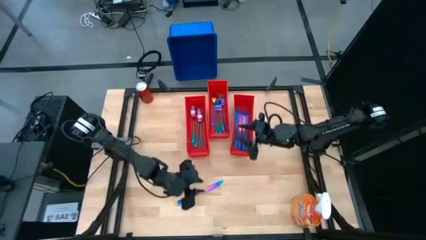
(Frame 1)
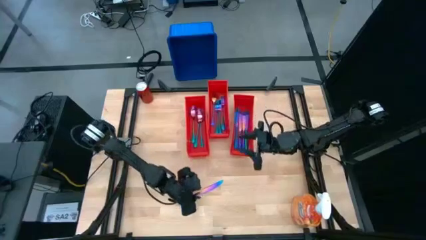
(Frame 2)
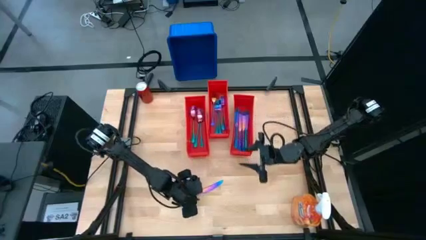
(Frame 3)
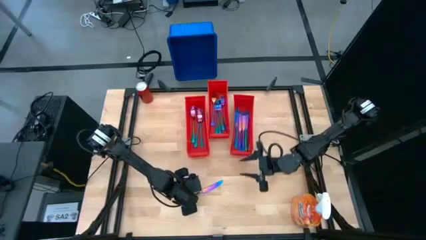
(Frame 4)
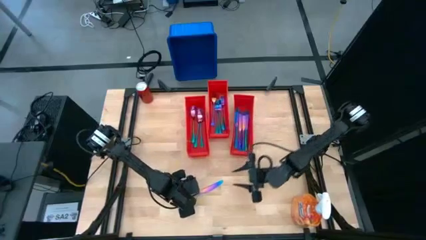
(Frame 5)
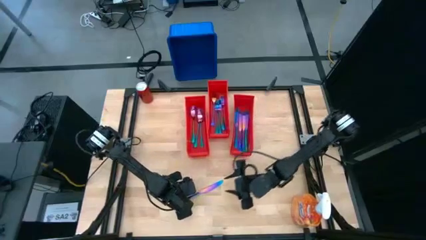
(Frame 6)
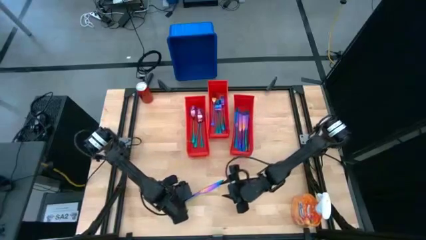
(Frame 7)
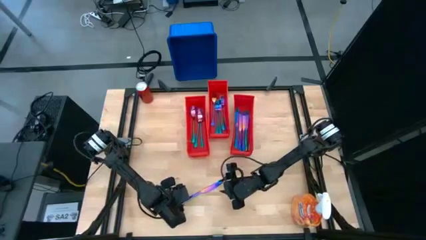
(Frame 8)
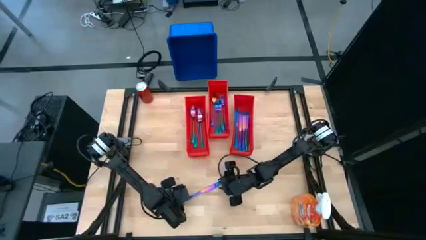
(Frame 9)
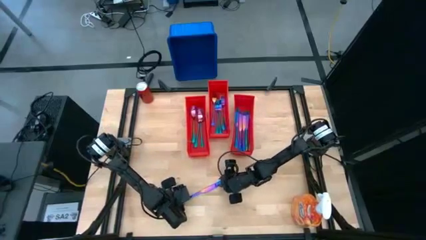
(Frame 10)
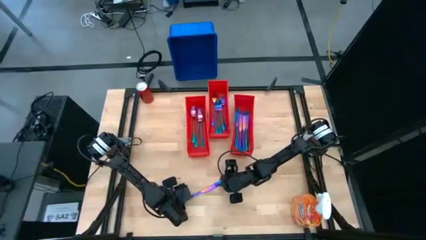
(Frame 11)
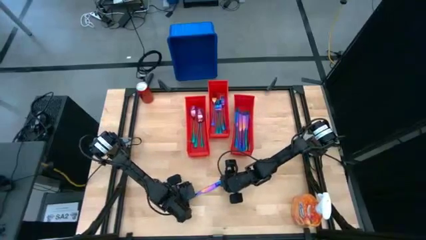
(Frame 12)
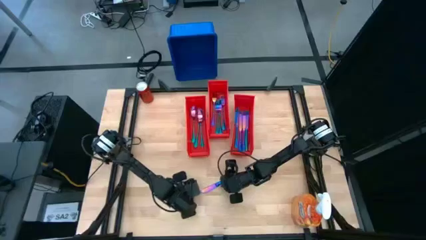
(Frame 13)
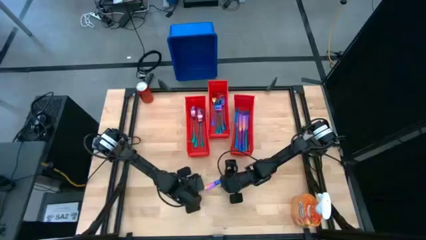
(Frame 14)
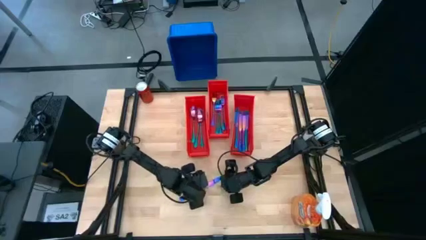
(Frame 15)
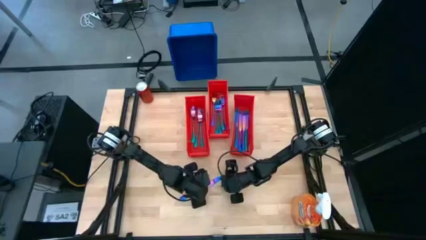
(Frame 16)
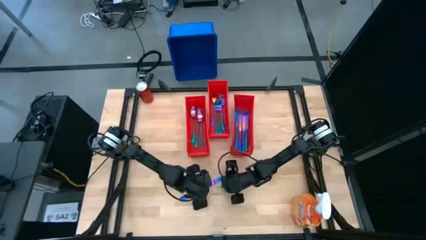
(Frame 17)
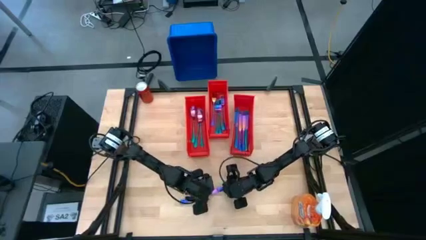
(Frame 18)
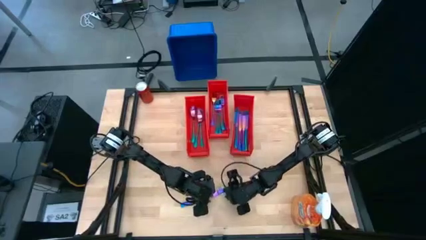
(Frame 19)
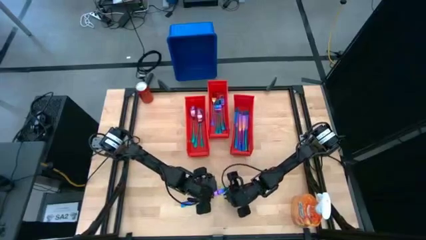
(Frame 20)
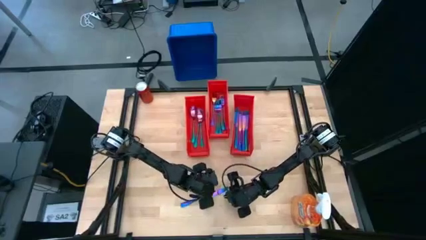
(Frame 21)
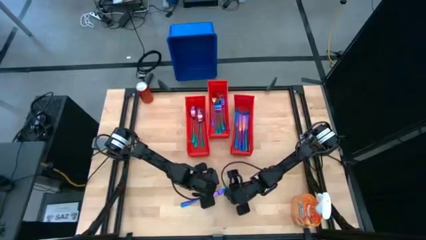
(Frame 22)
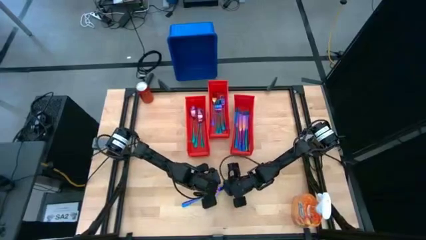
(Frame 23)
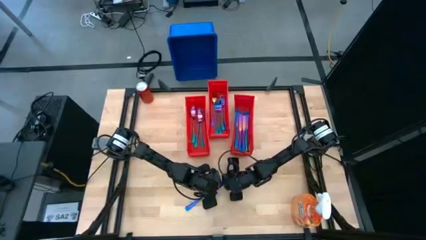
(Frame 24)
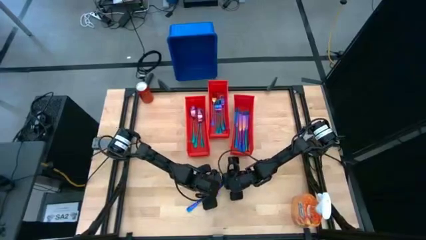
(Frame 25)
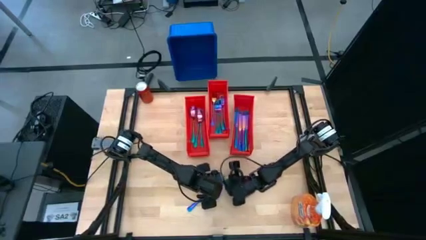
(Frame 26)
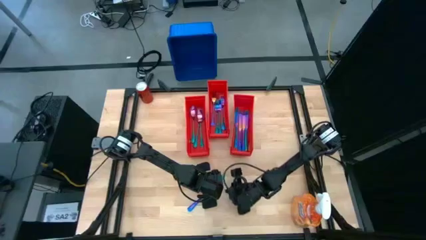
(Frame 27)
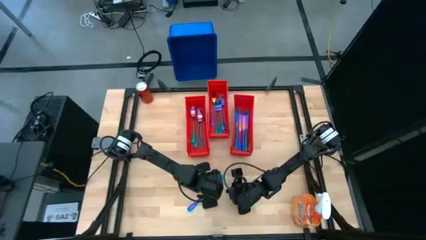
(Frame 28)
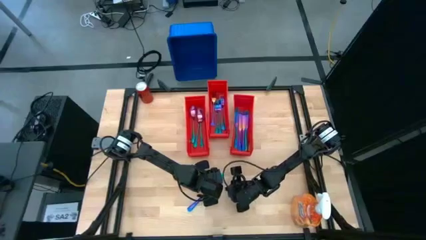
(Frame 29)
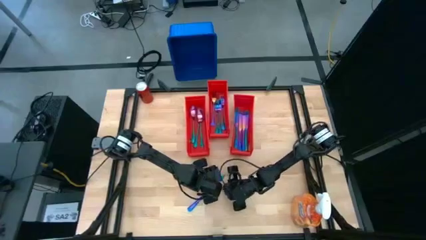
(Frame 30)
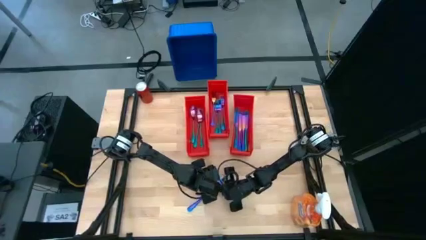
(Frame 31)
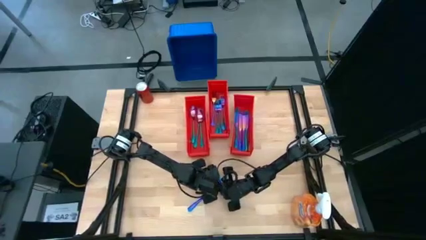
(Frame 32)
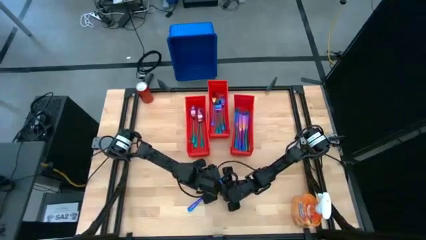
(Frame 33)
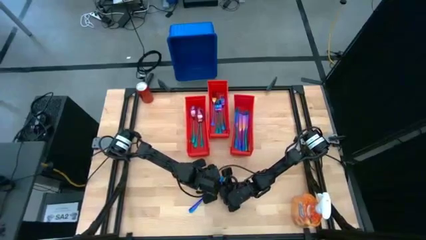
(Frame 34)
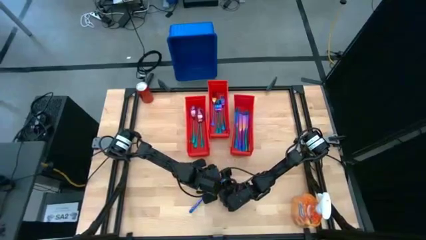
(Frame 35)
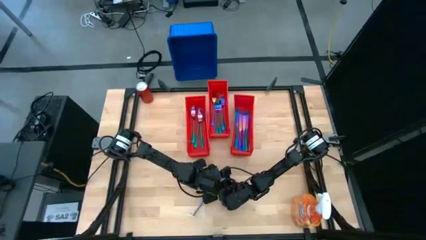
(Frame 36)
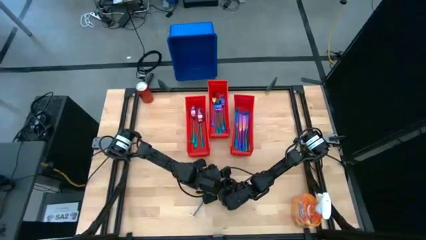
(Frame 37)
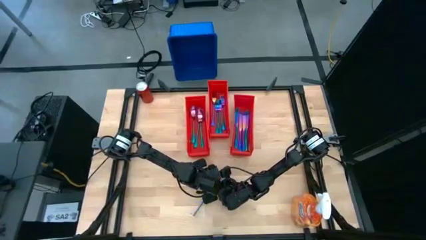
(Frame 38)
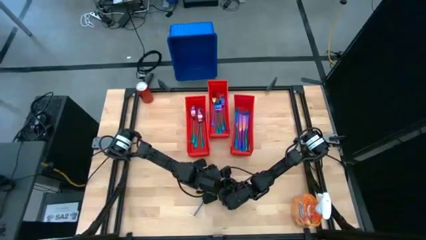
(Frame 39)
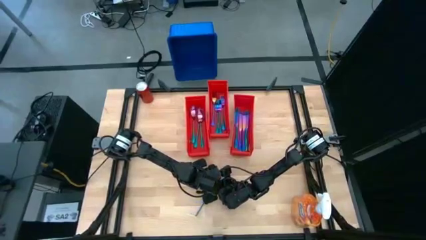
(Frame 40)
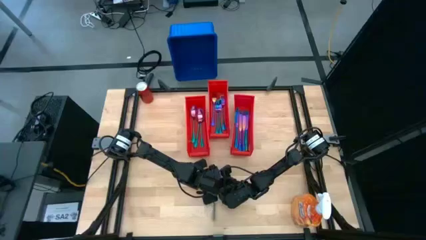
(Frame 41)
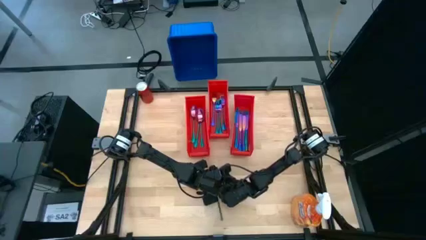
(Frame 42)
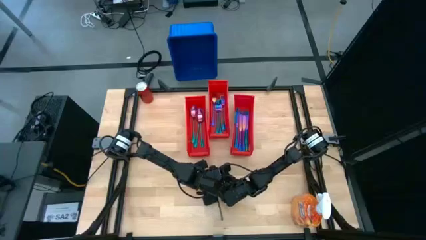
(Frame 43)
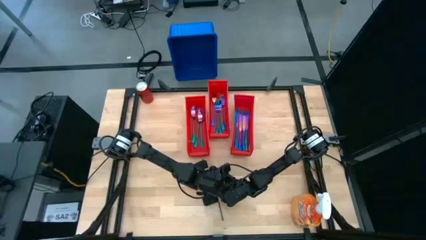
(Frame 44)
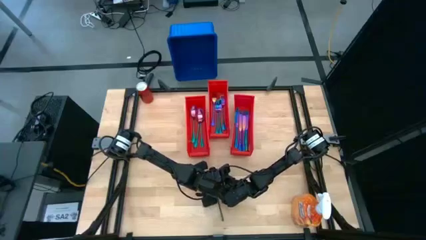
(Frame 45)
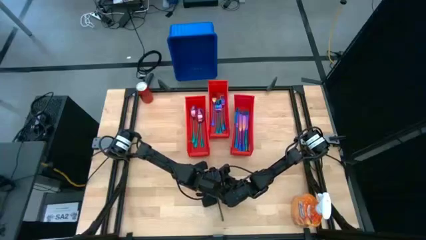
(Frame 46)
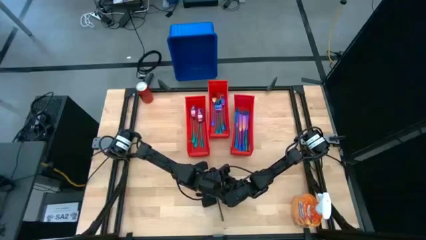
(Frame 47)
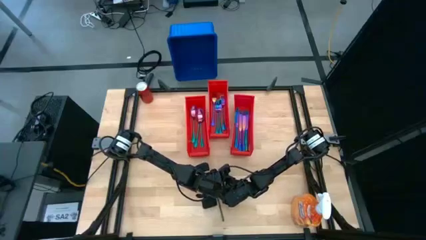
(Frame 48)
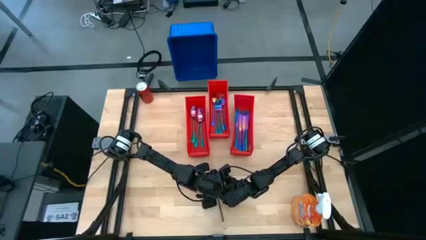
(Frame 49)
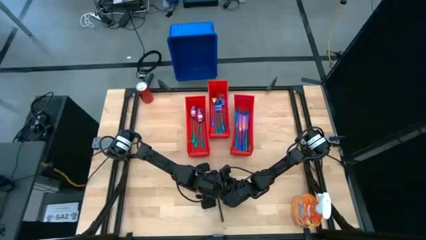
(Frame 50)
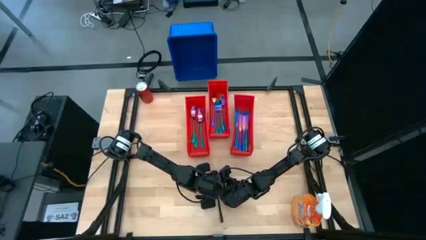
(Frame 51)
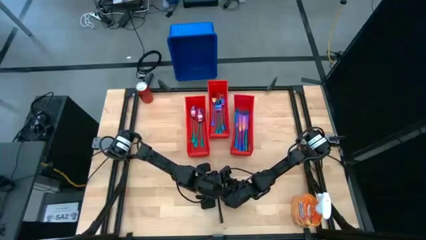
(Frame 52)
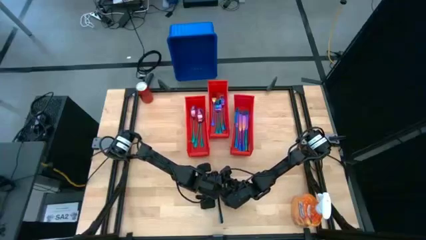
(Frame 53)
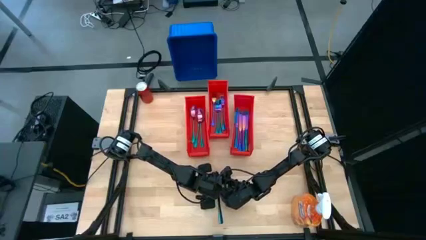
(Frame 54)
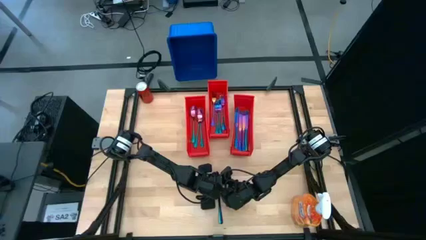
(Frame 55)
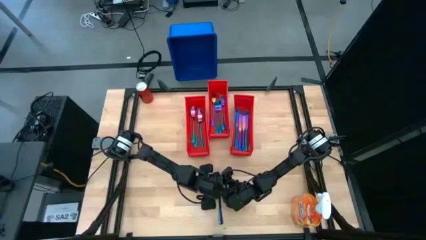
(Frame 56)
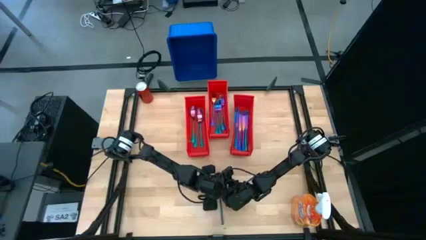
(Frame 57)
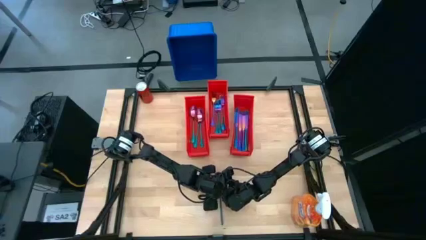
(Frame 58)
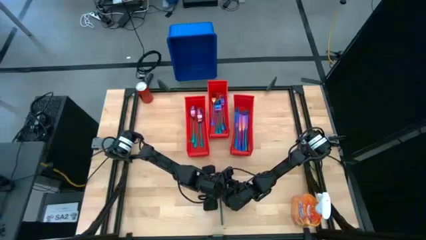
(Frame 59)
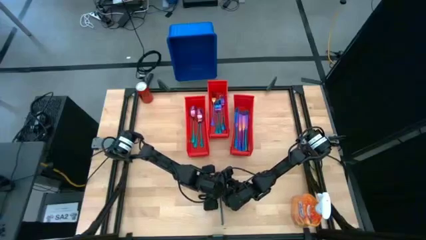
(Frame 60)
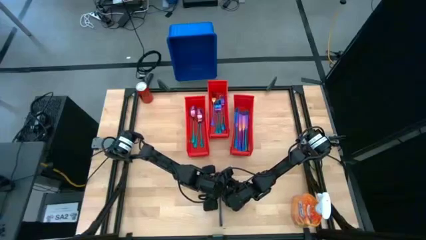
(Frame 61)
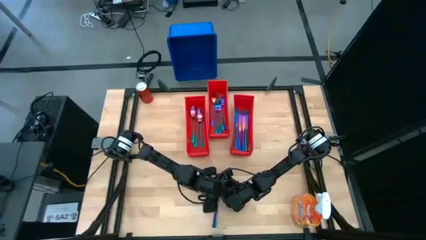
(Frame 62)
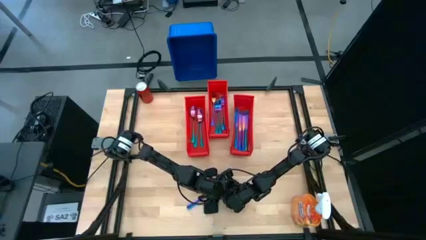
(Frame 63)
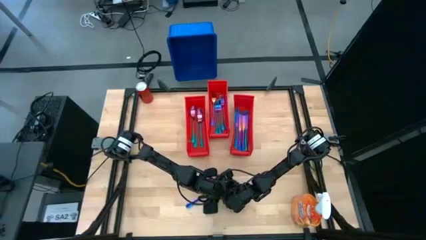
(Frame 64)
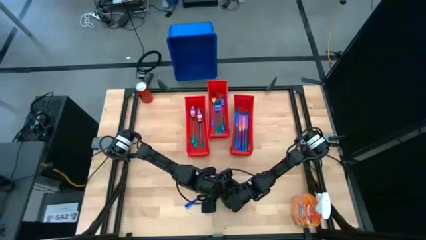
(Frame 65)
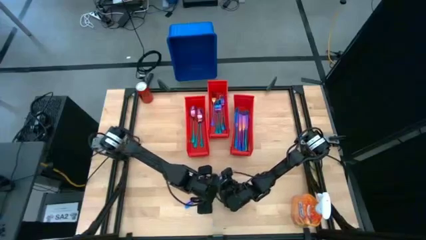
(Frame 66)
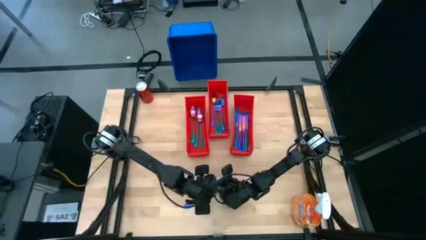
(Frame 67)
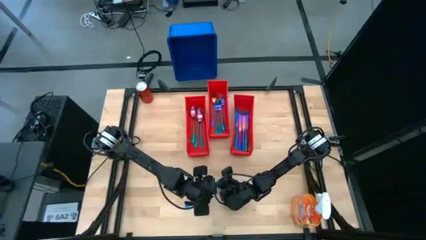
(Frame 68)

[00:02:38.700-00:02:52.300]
Task: Sort silverware
Put the iridescent knife into the right orange bin
